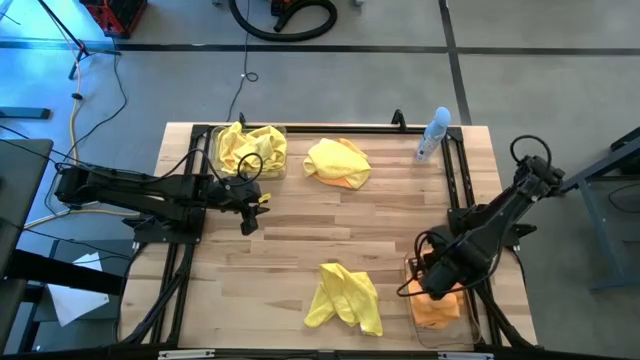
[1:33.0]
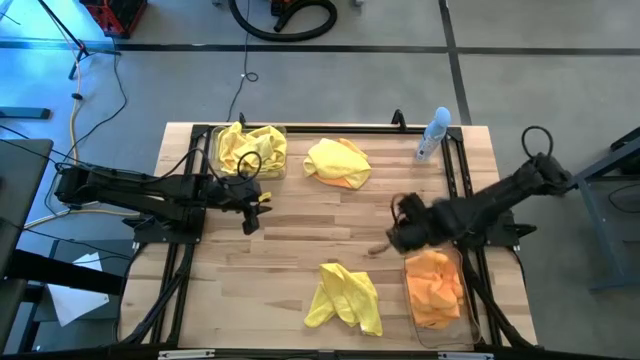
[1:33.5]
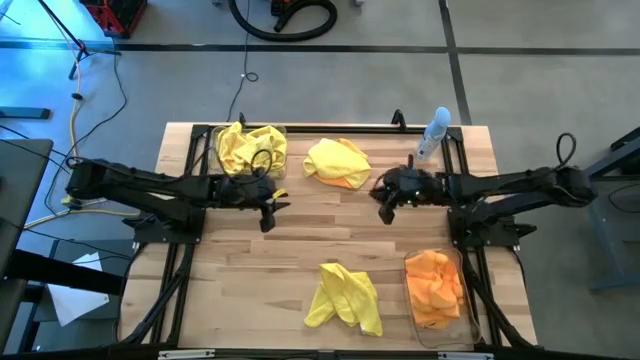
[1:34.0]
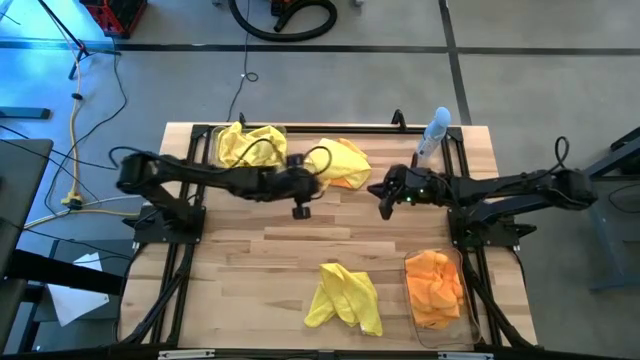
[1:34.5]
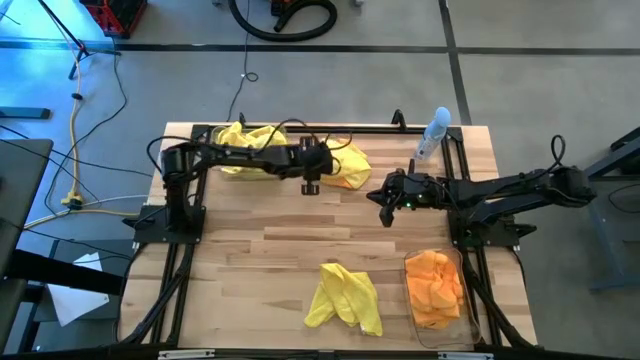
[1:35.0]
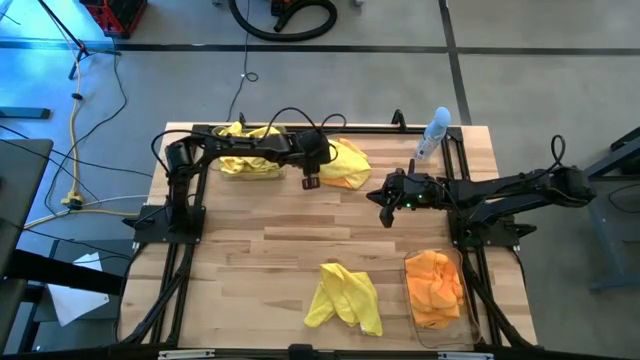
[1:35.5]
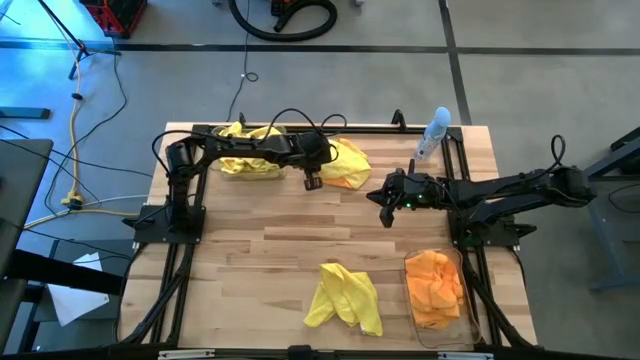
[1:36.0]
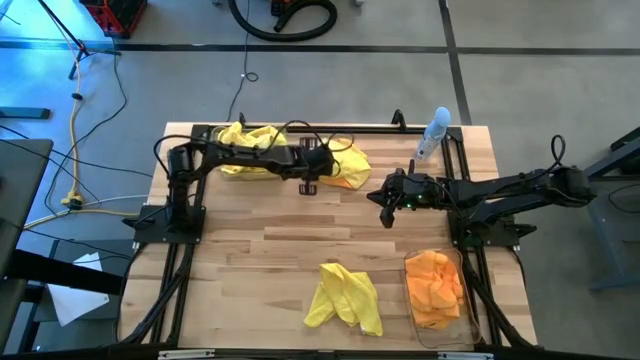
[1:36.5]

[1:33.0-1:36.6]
Task: Sort microfiber towel by color & place in baskets
Put the yellow towel into the top transparent bin

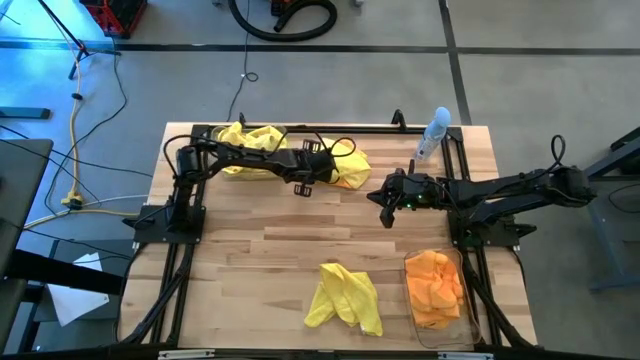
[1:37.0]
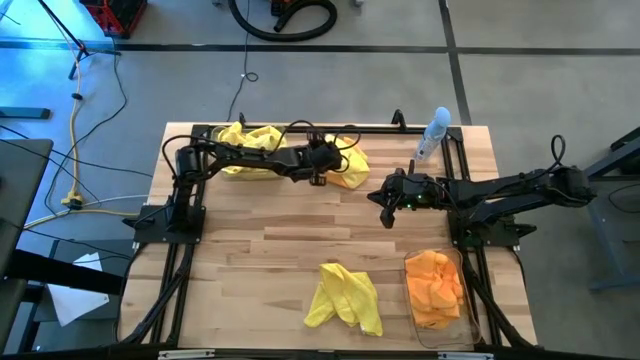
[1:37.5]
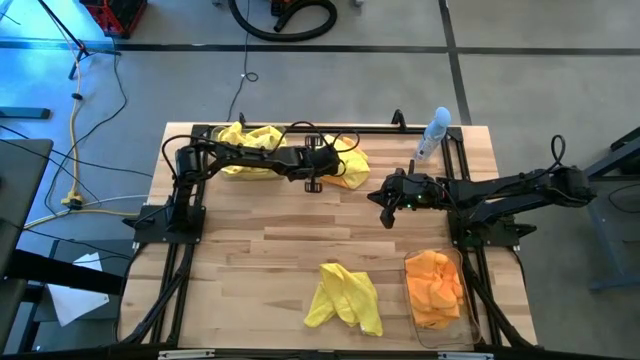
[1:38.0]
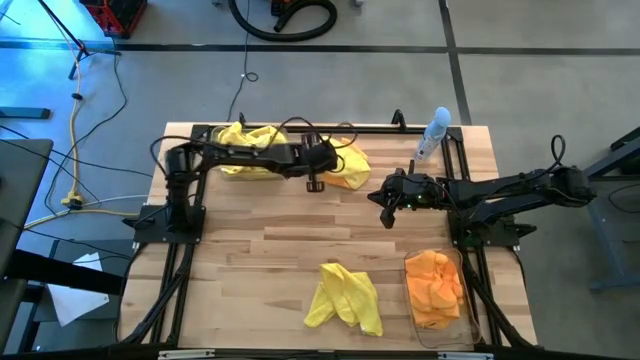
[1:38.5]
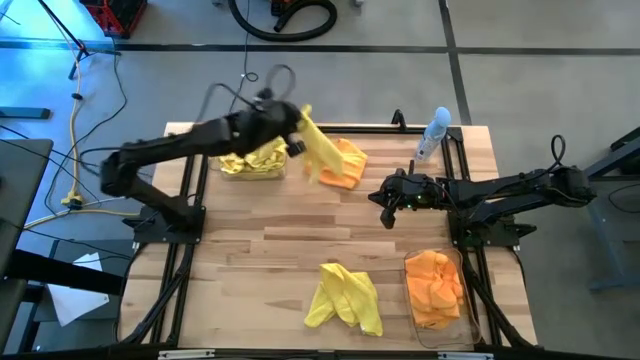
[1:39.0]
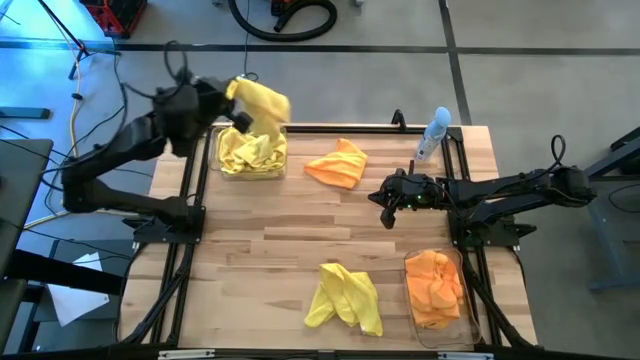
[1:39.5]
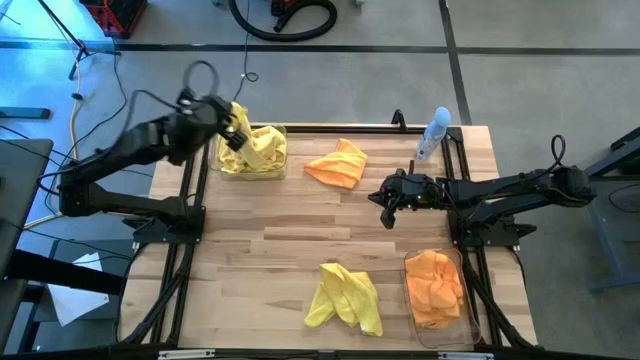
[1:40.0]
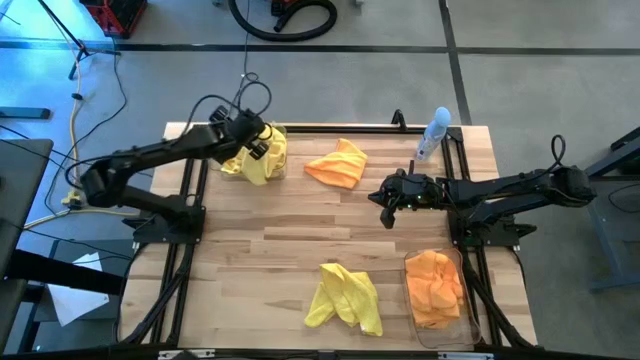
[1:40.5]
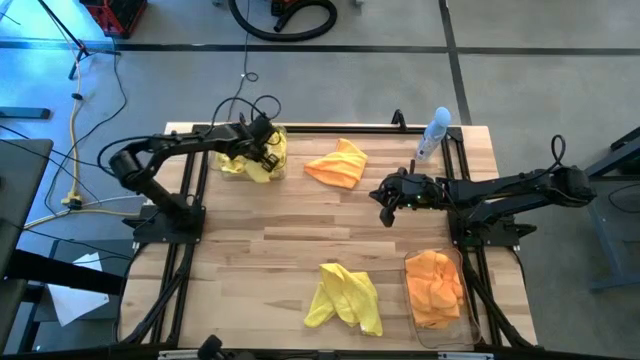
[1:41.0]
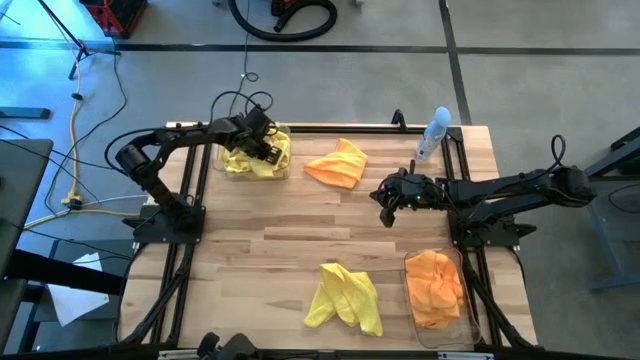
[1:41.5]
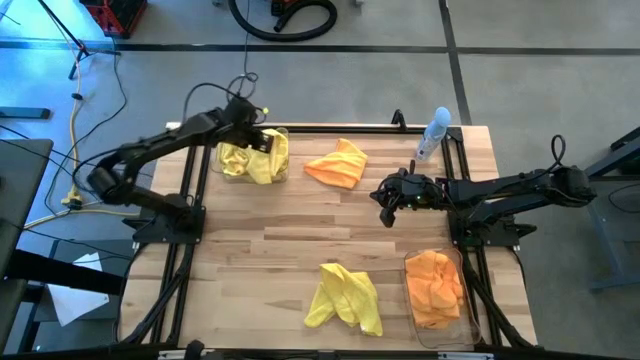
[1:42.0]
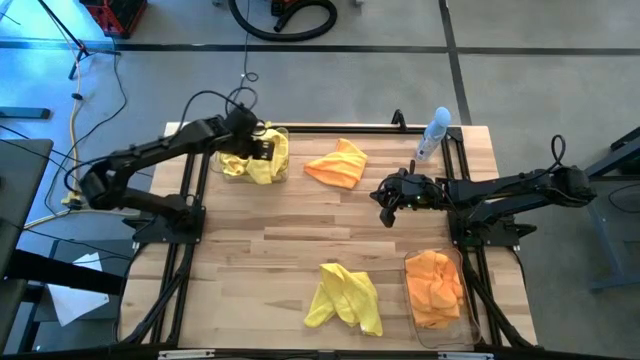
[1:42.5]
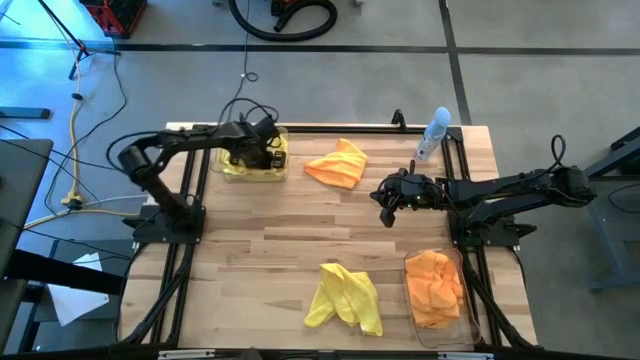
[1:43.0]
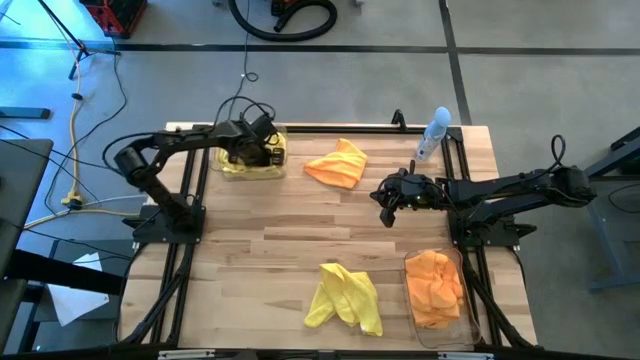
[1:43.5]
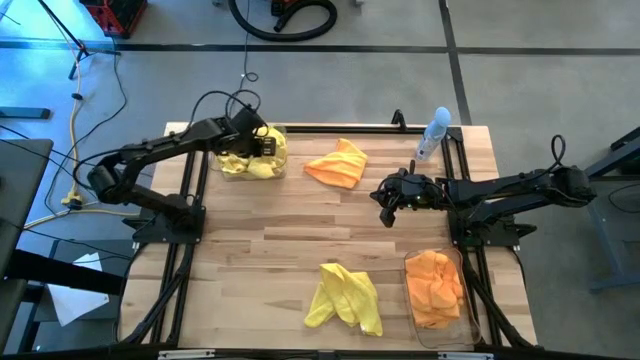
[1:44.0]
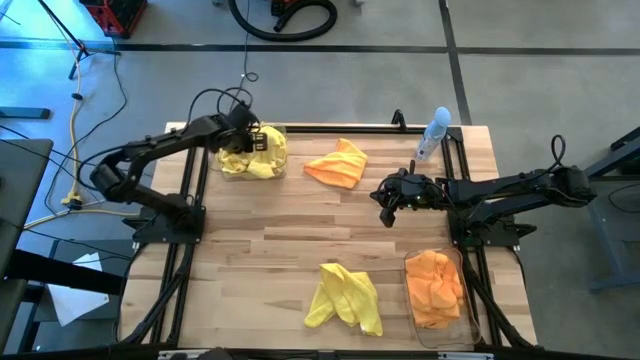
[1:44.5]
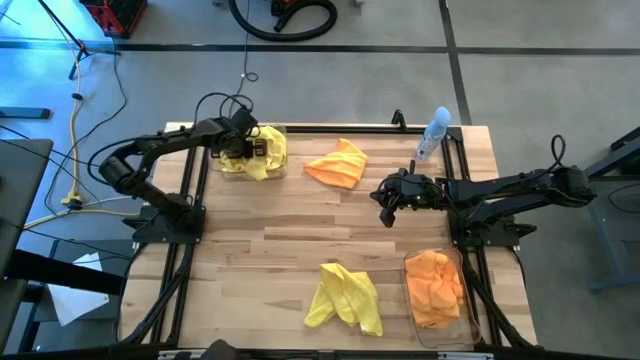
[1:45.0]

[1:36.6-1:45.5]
Put the yellow towel into the top transparent bin

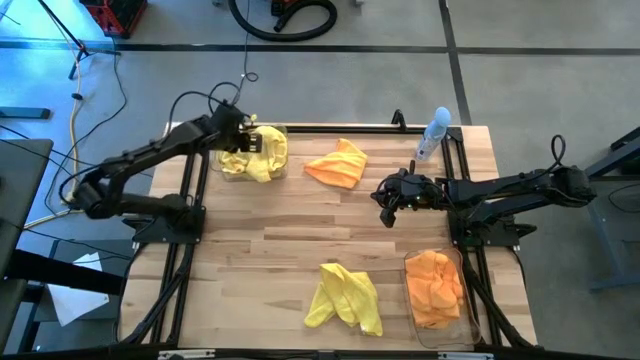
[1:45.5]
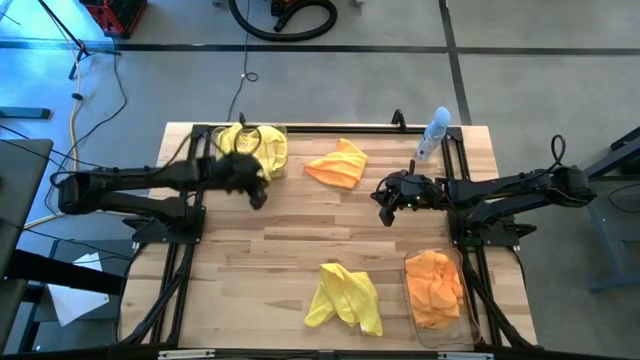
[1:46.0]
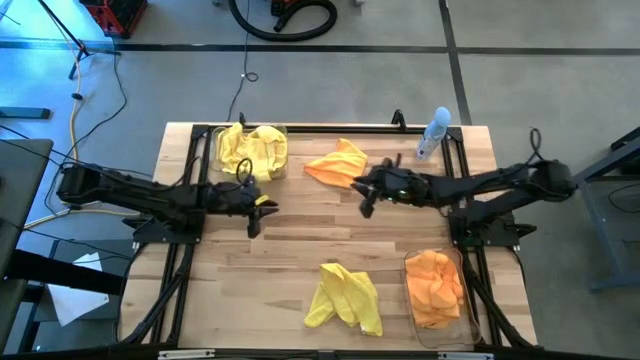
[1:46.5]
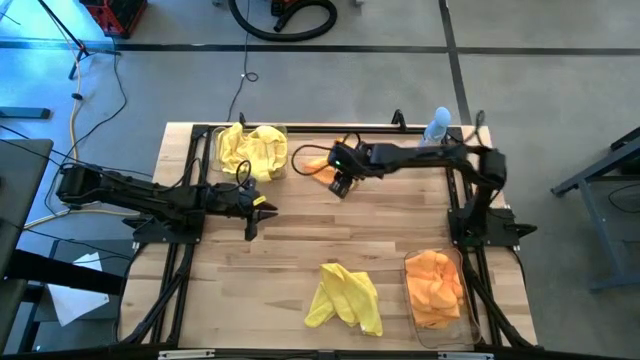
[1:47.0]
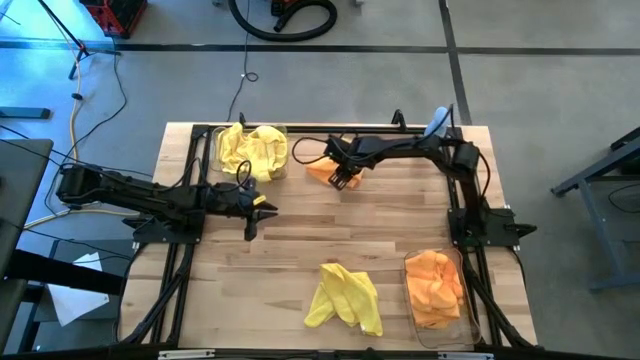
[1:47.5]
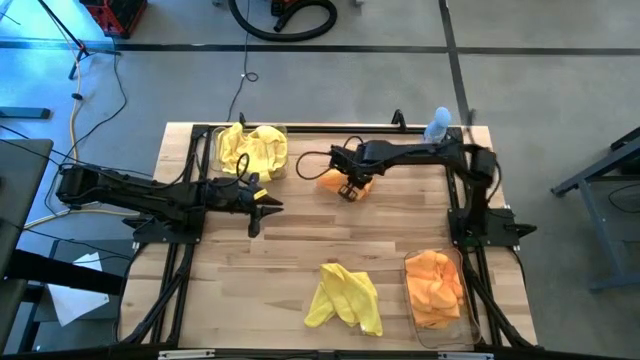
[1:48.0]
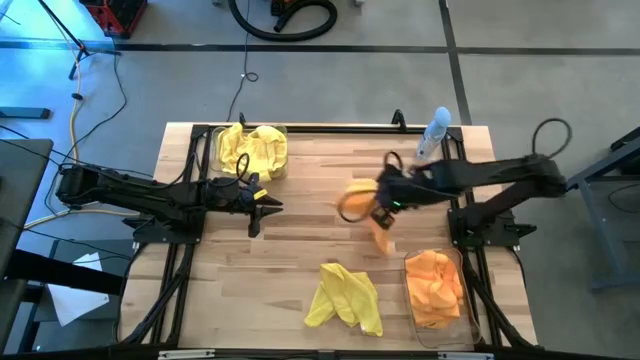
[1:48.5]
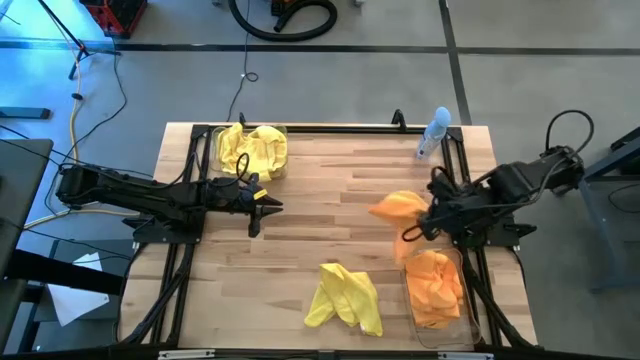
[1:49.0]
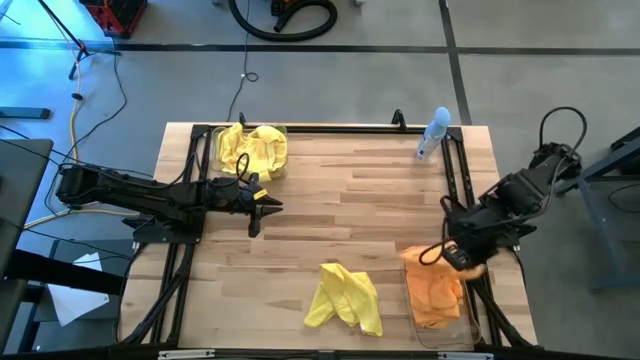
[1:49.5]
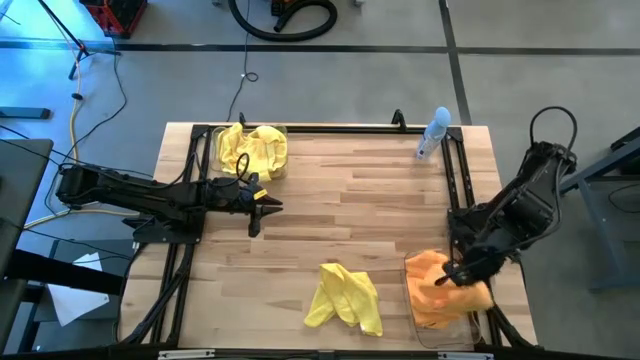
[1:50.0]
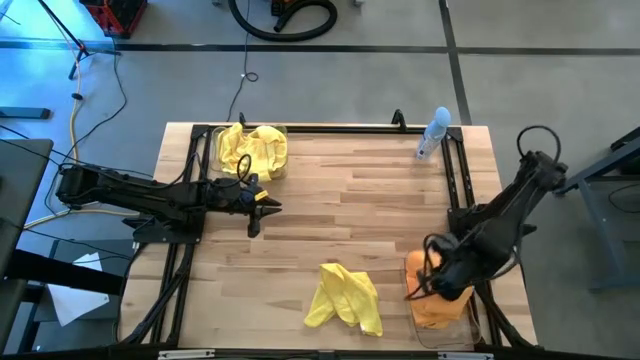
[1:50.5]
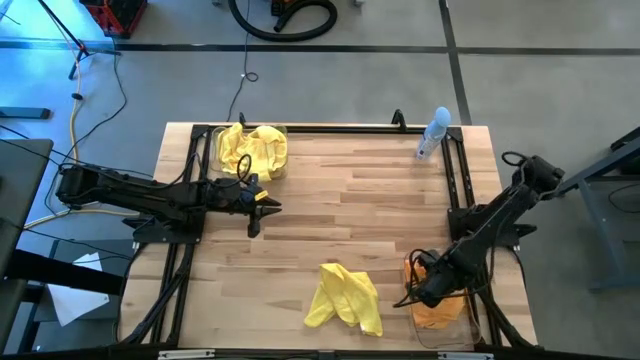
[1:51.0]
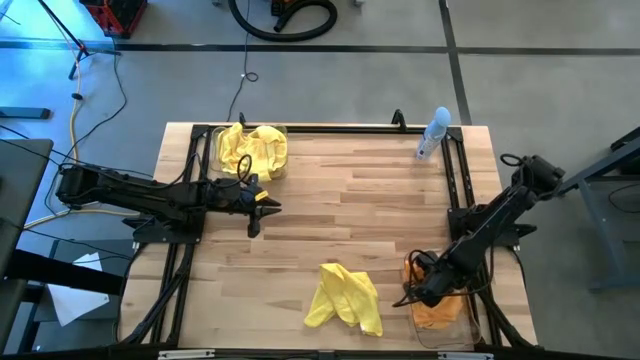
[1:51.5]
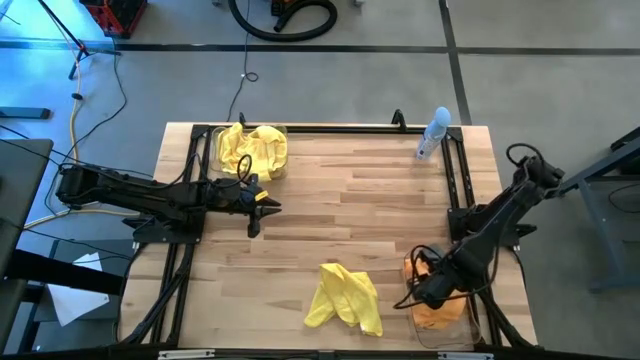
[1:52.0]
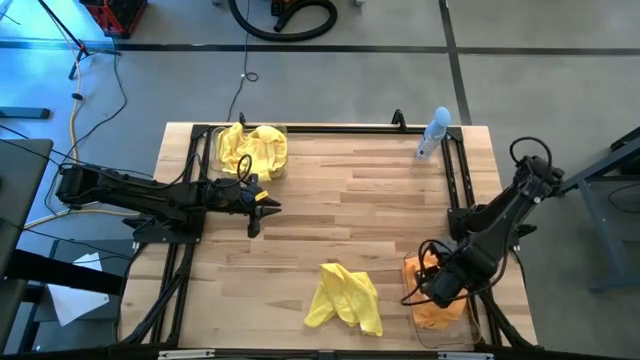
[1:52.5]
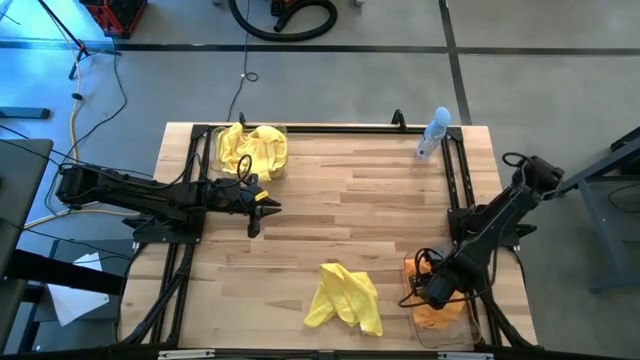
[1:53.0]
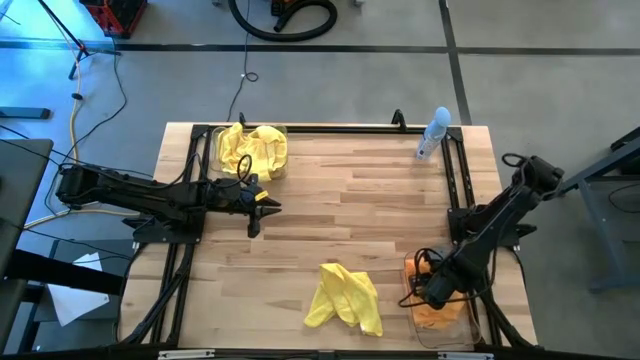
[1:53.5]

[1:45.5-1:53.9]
Put the orange into the bottom transparent bin
